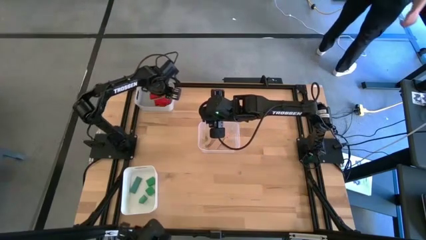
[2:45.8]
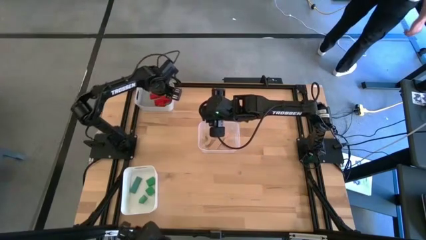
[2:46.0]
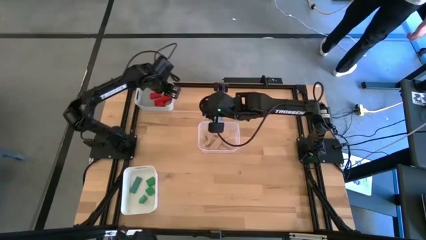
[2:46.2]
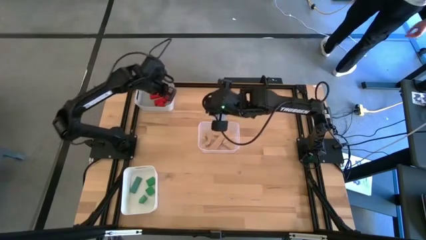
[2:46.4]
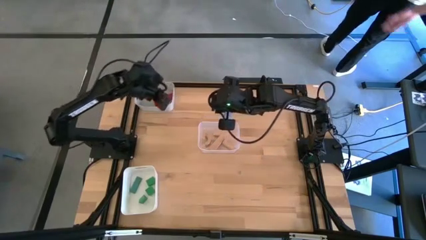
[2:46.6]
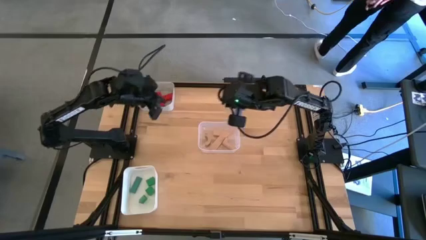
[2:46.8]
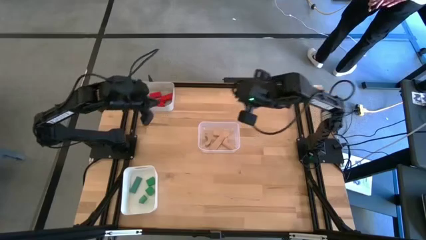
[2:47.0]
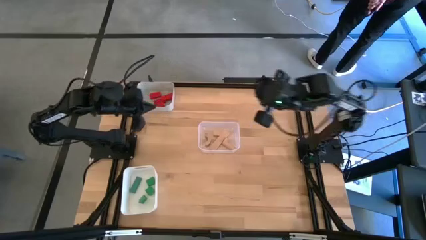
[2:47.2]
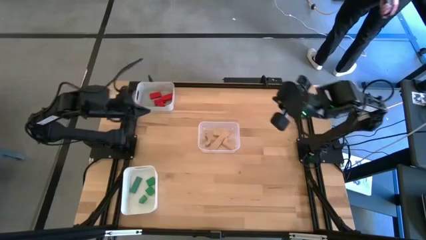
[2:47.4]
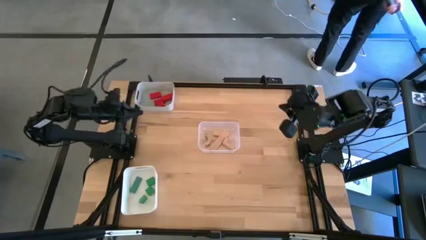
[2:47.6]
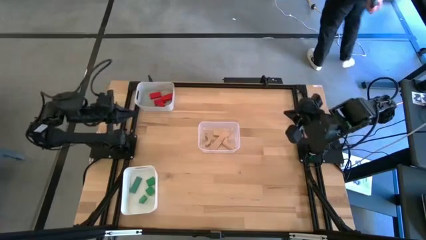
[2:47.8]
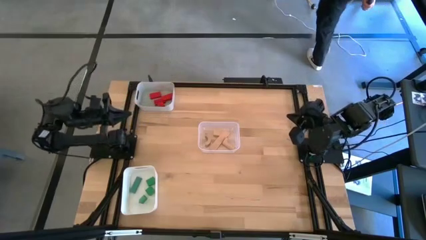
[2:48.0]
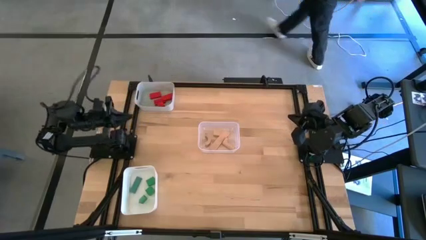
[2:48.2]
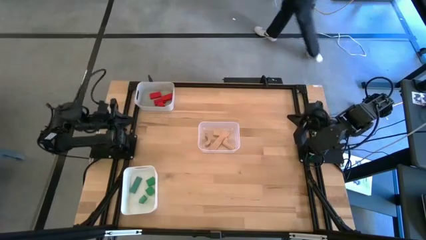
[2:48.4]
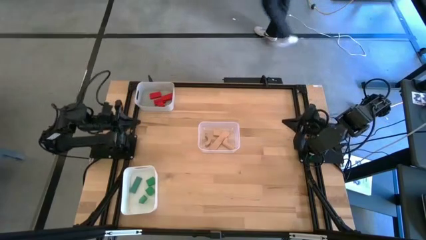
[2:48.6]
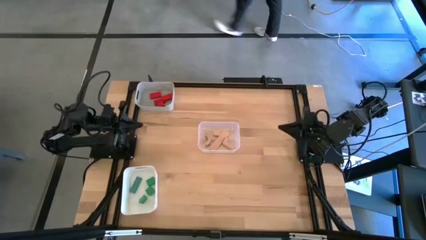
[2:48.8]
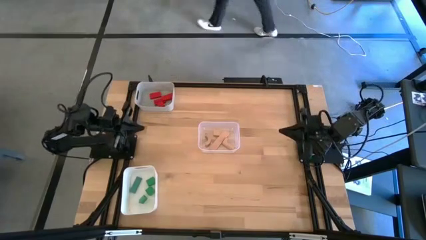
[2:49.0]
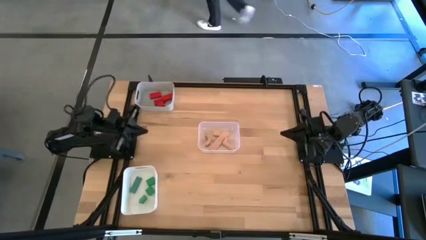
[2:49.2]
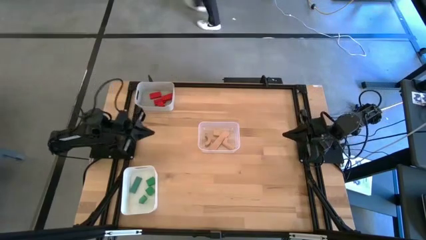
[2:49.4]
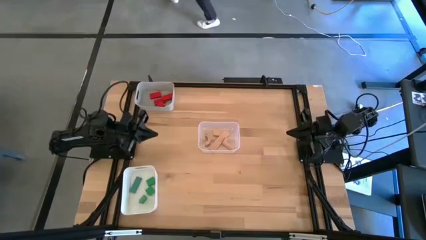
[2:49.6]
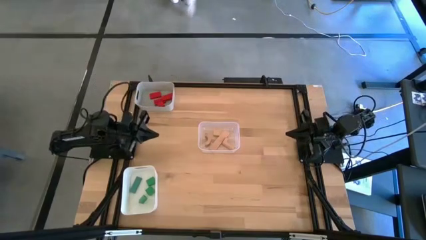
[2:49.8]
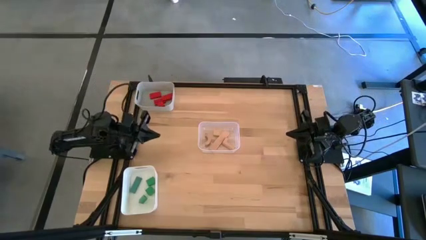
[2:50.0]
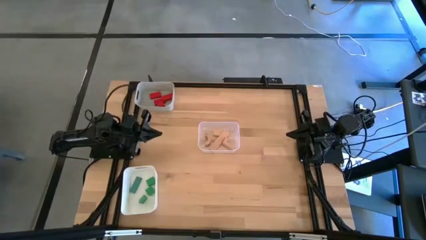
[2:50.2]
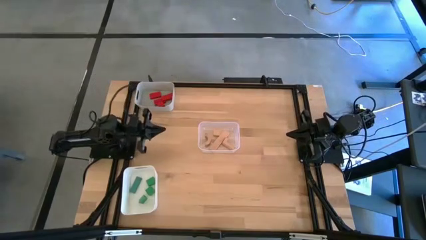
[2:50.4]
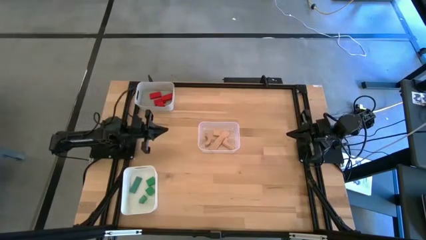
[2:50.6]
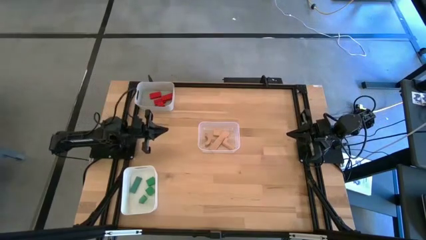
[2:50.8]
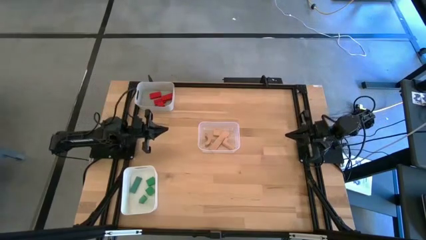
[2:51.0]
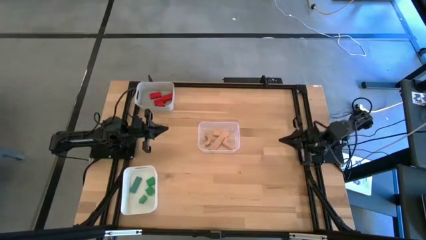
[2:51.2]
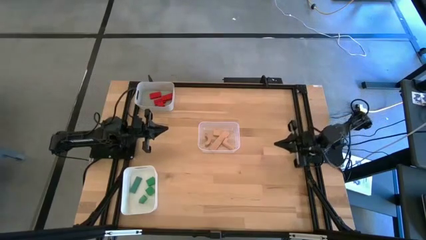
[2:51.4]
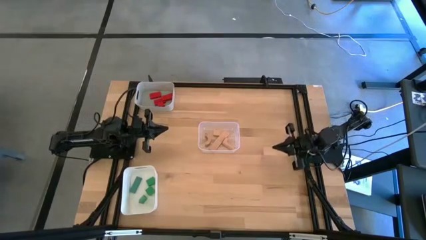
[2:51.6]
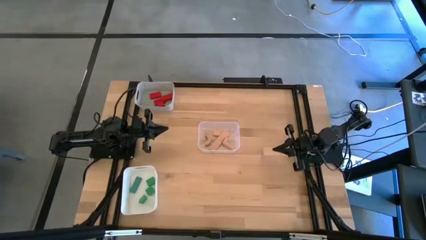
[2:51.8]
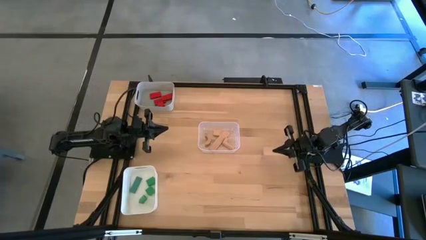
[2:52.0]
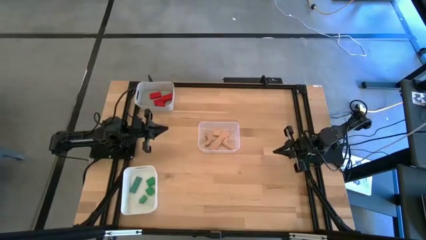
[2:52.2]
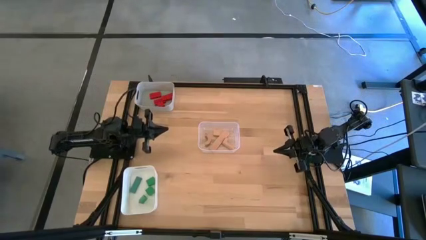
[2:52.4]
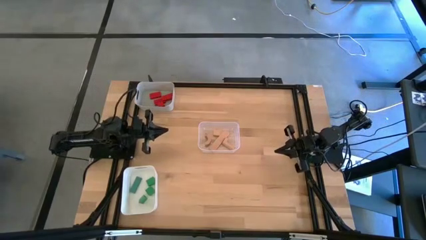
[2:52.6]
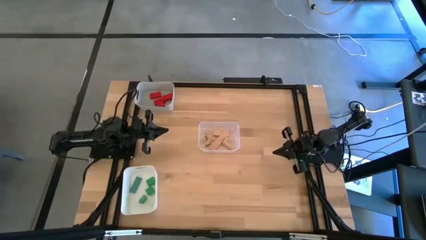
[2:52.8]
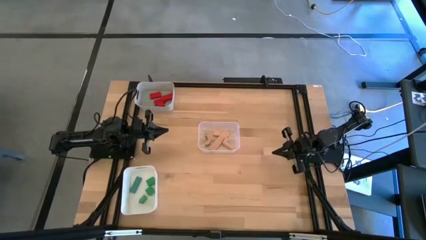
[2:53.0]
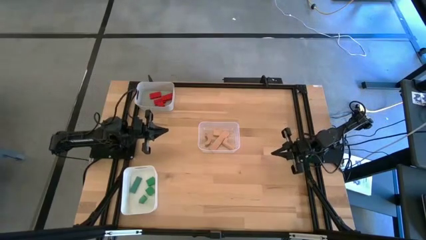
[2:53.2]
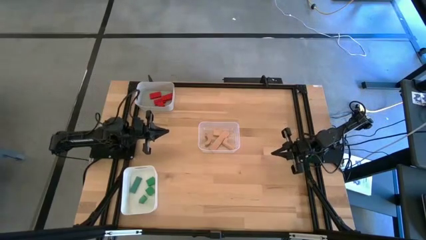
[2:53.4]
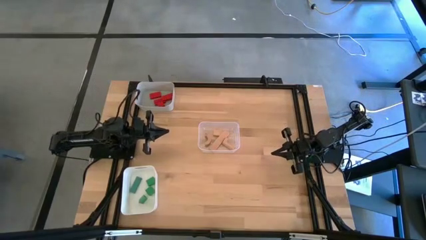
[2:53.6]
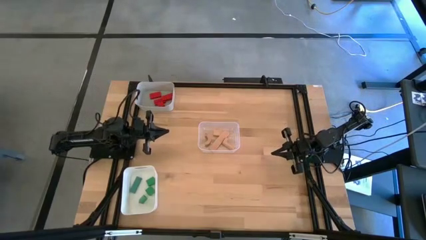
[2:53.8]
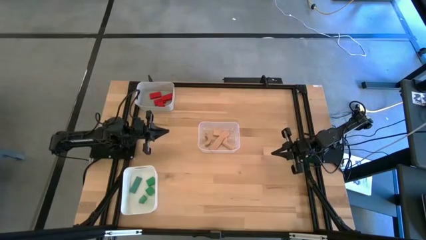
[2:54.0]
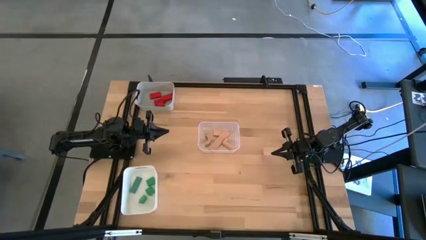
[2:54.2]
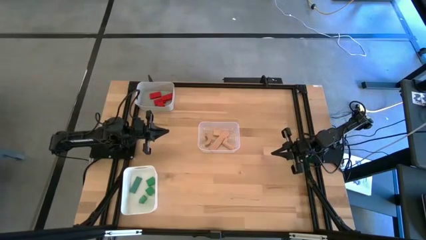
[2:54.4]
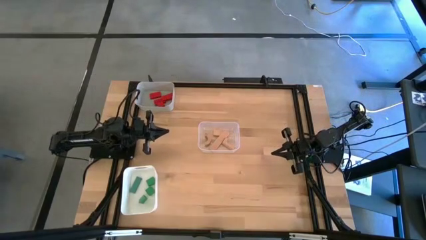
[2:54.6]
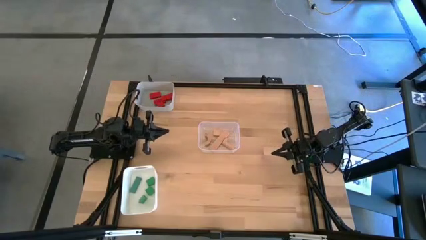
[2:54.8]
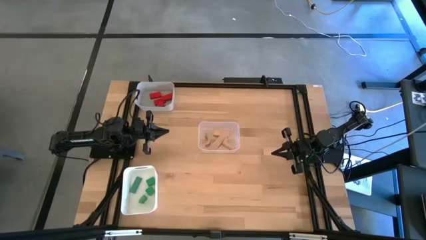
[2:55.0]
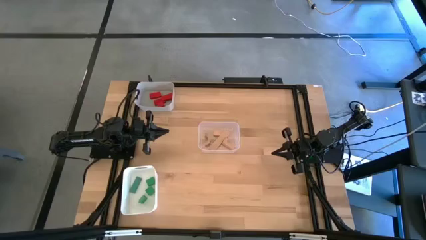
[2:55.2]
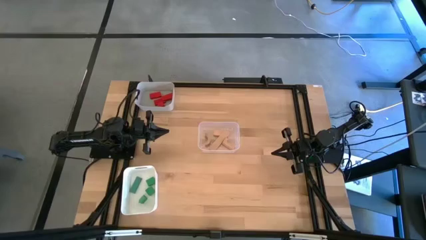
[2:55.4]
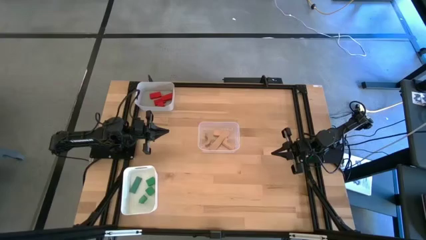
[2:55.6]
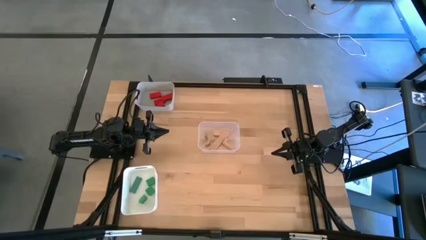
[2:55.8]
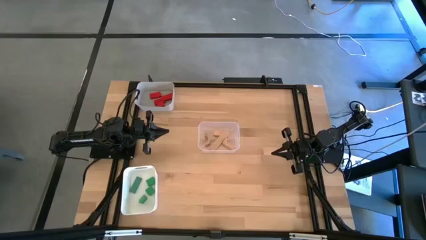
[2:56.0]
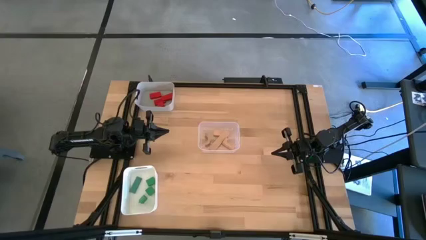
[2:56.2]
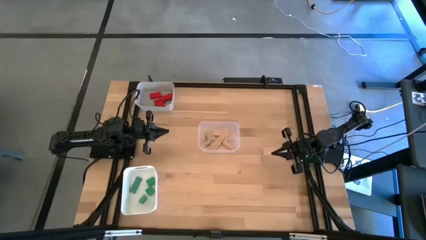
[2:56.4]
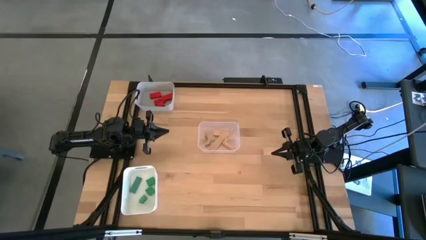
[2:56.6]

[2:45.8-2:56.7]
Task: Sort & place blocks by color
Return to Home Position

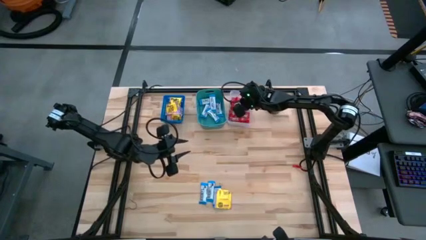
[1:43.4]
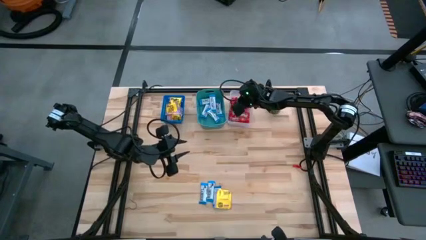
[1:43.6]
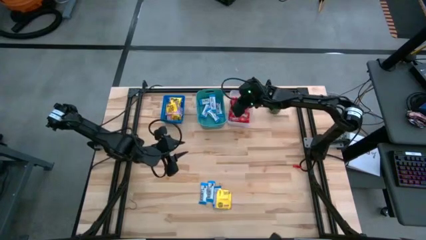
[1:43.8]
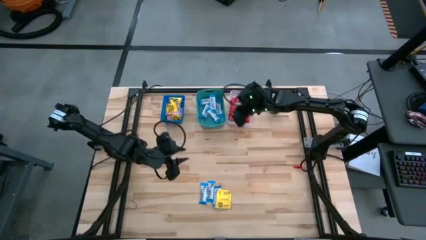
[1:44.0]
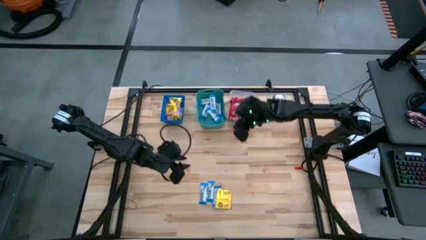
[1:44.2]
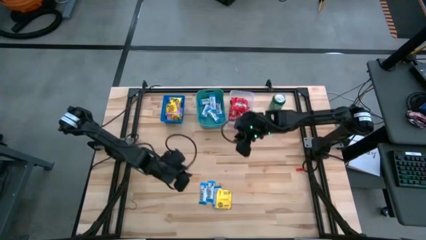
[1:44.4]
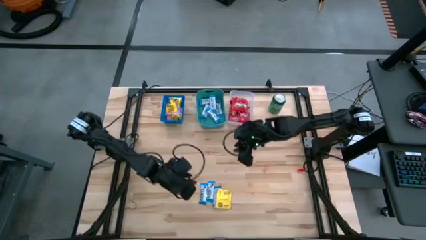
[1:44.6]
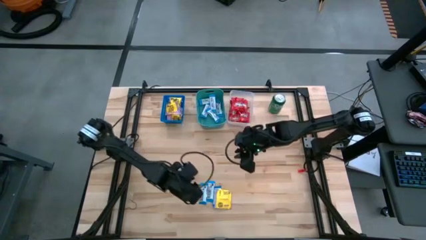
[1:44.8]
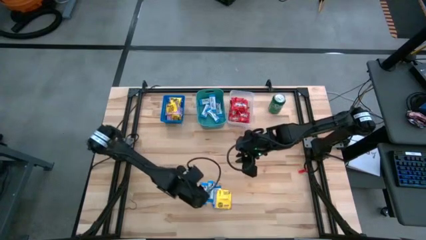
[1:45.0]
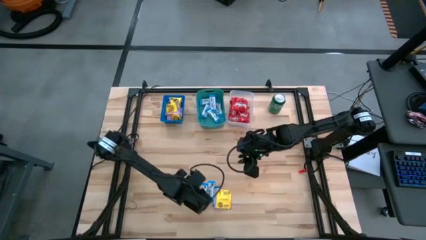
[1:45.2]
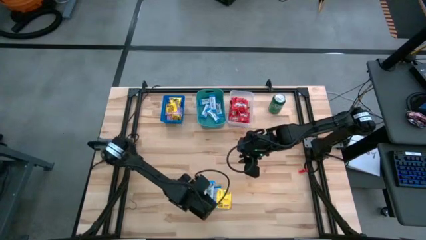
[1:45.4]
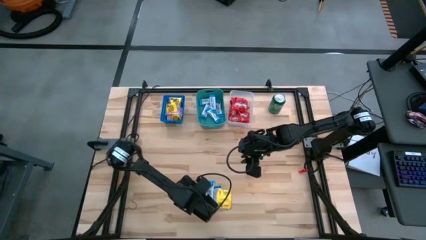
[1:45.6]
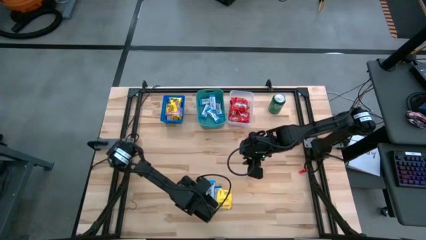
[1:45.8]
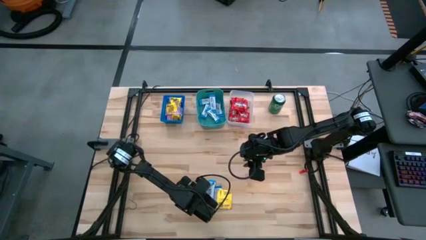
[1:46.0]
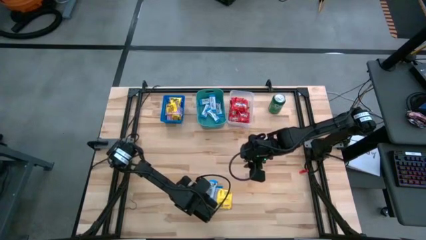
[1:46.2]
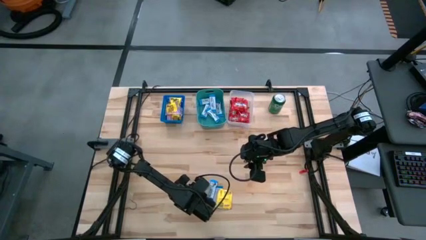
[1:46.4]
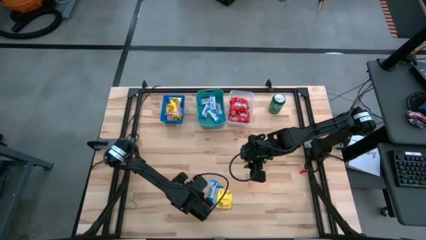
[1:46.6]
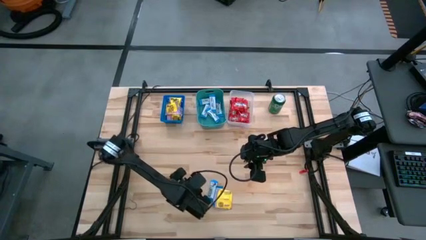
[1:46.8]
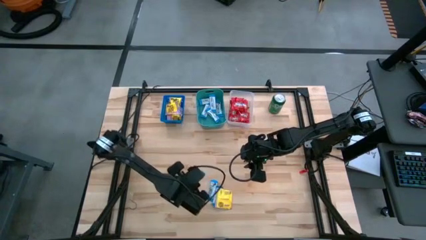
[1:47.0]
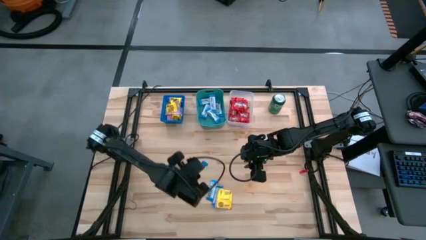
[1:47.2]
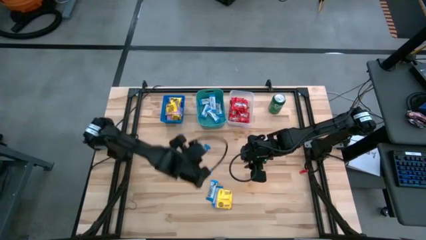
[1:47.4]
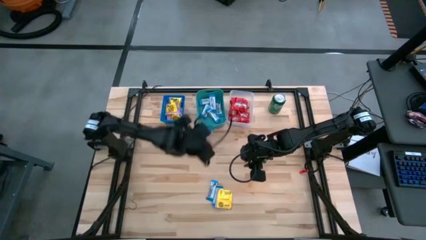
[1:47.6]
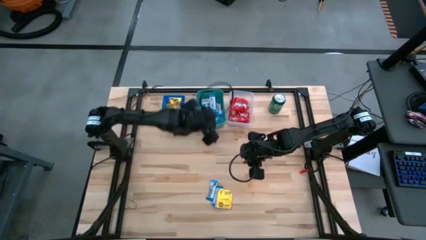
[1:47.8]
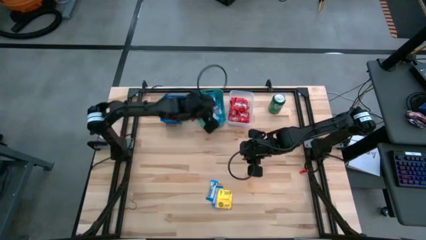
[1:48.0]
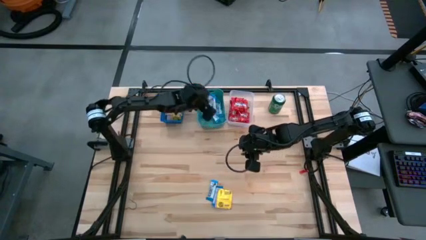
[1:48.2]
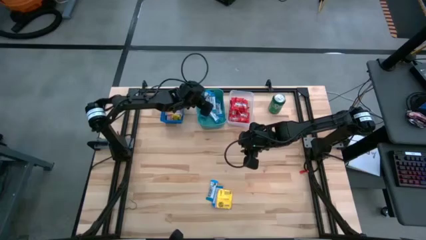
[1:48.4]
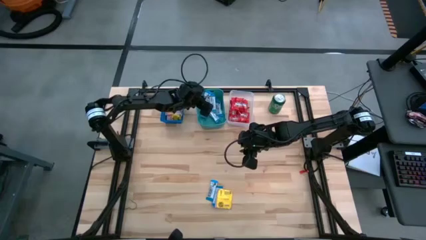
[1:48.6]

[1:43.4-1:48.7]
Task: Sort candy
Put the white chocolate bar into the green bin
